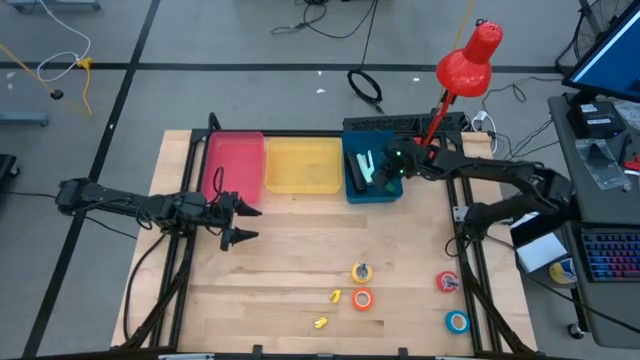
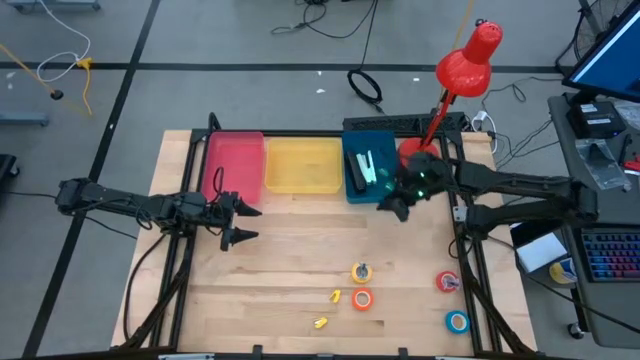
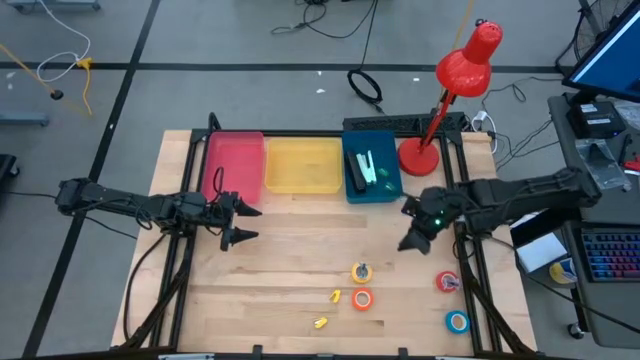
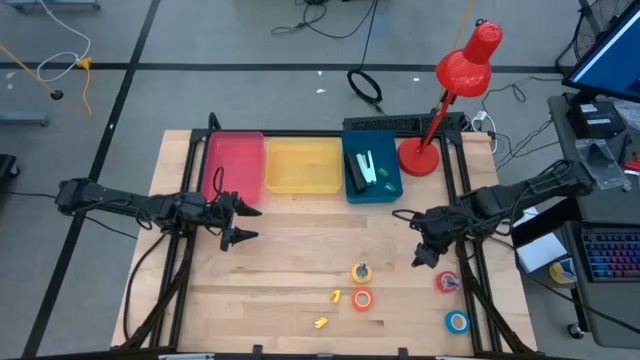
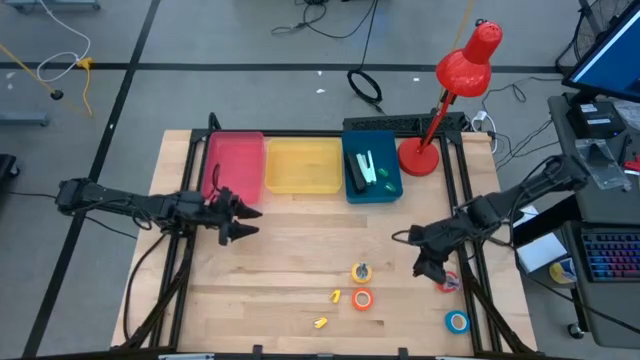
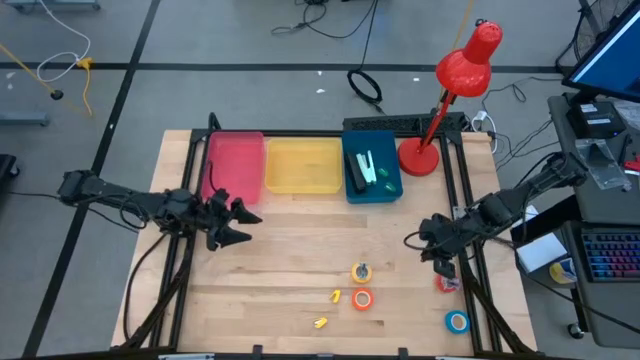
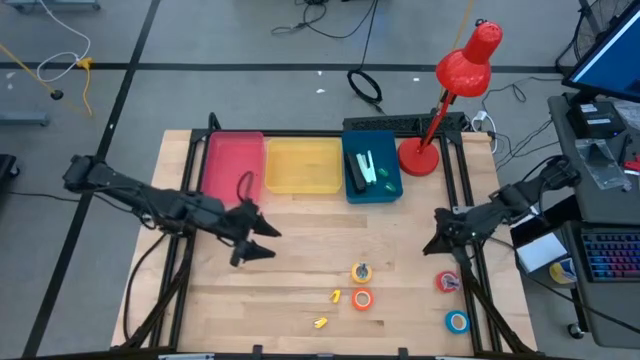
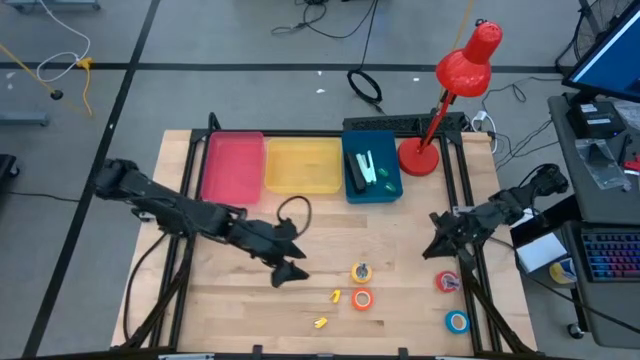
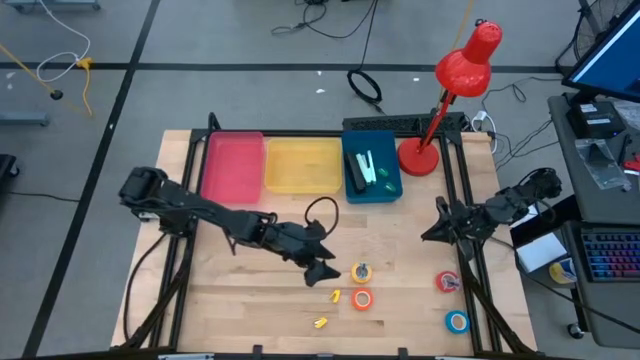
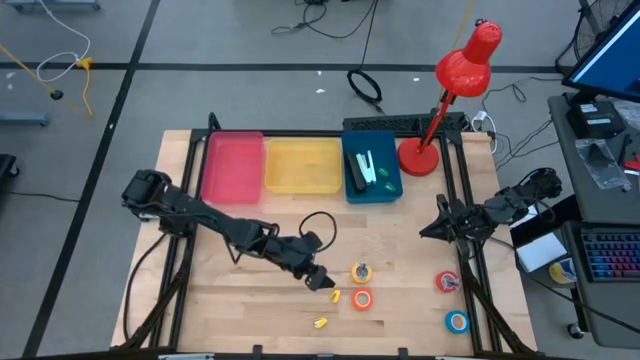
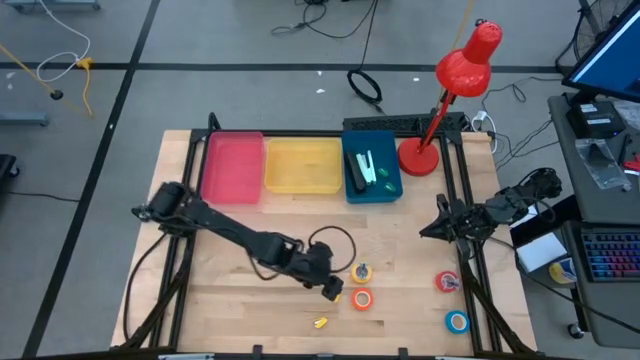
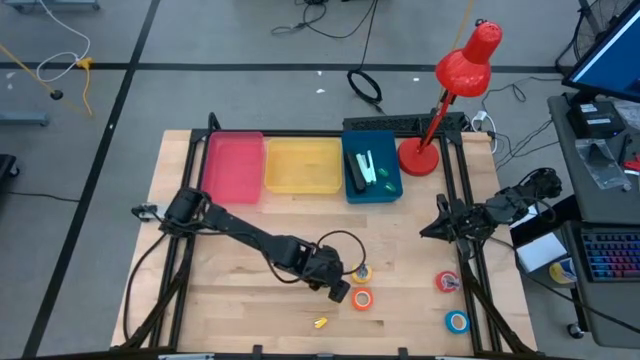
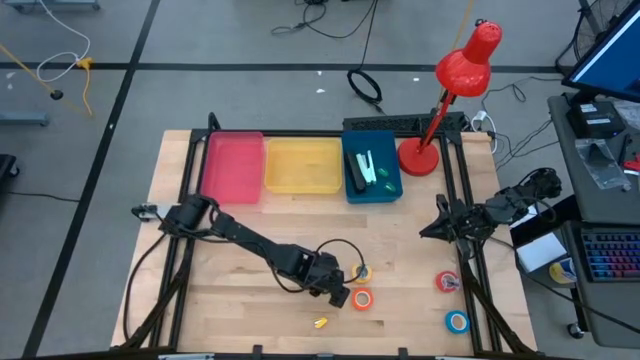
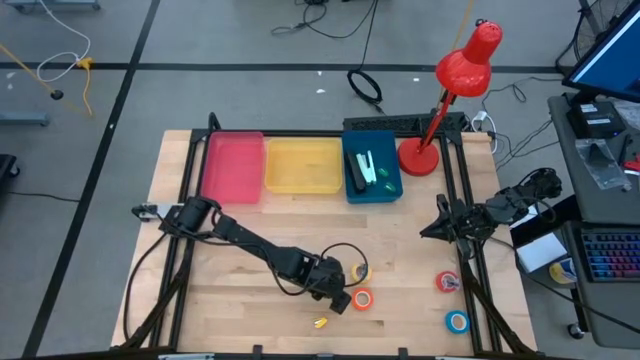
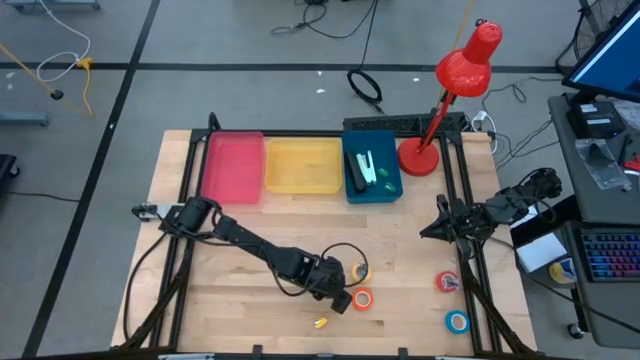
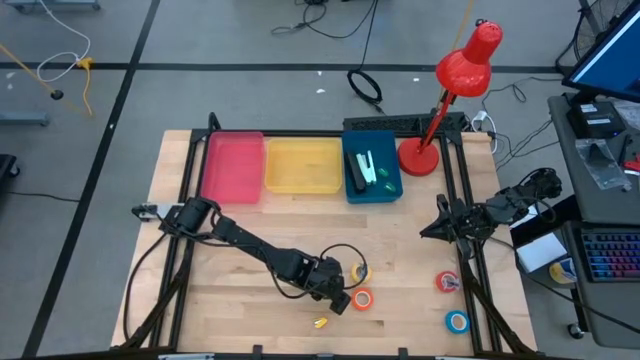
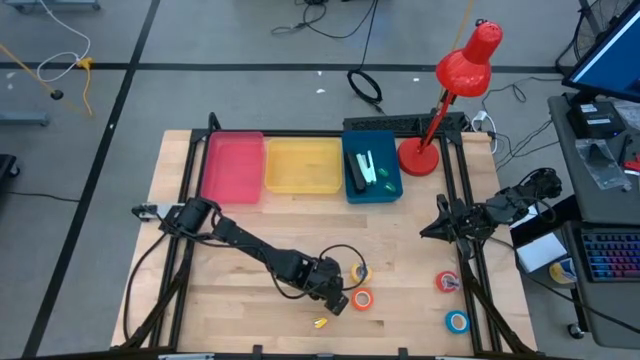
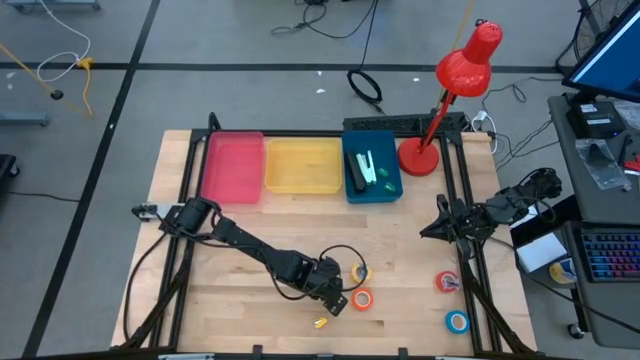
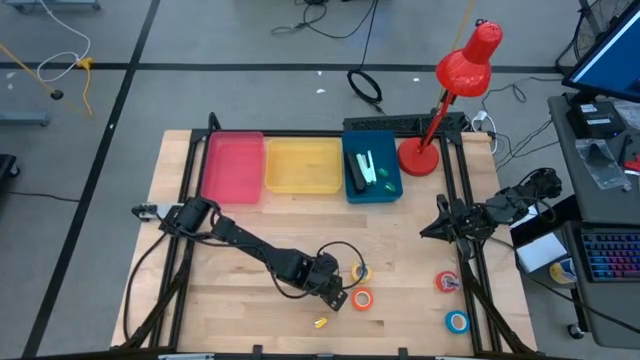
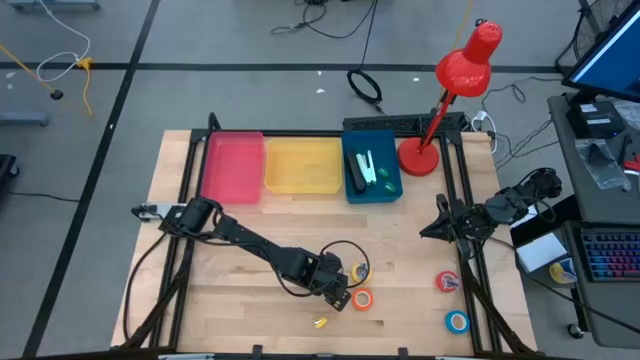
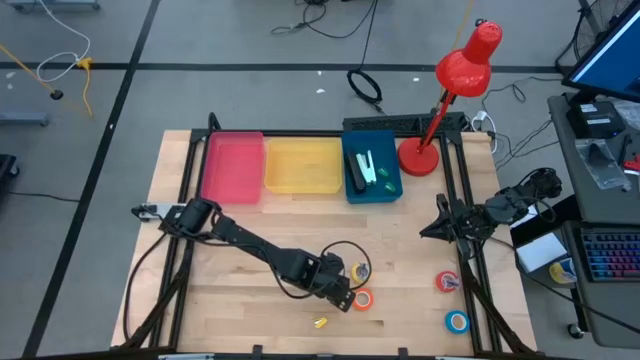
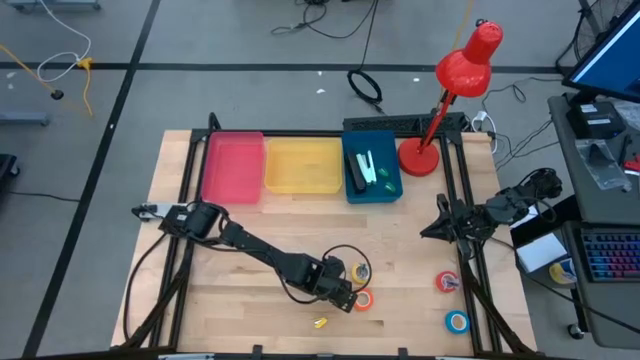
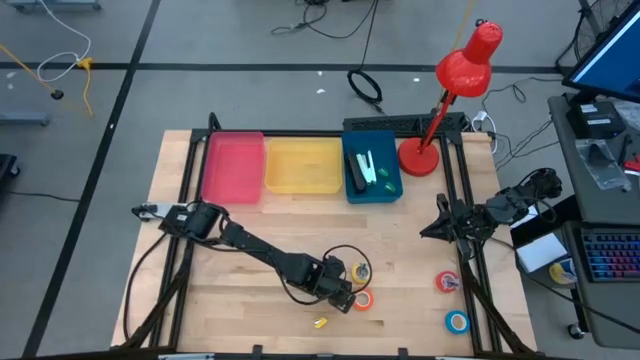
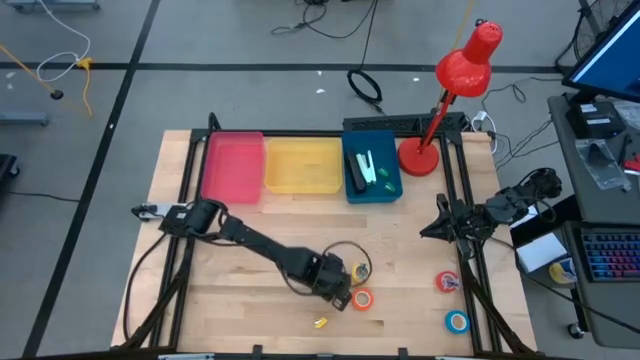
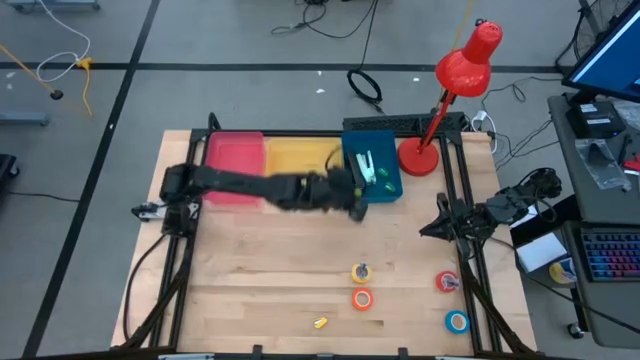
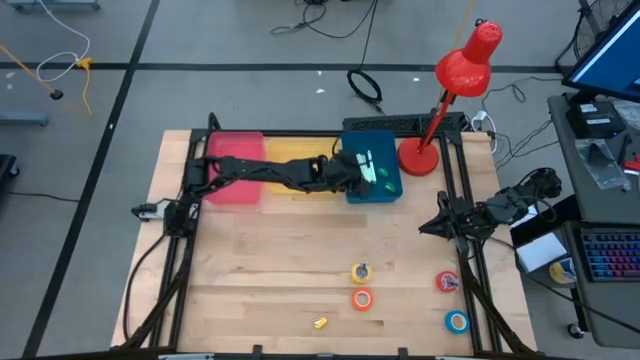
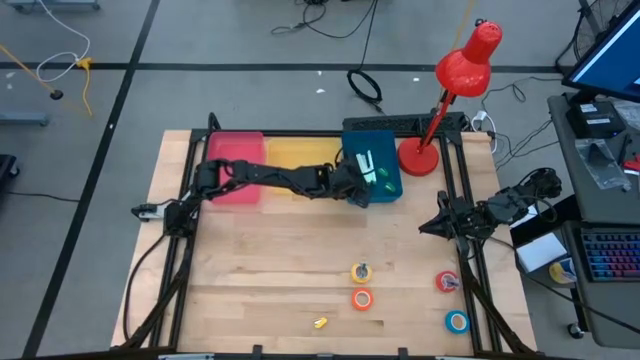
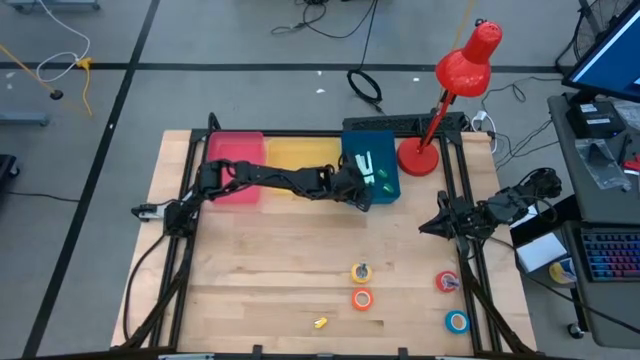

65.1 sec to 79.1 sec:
Task: Pick and place Stapler, Stapler remover, tape
Put the top yellow small stapler into the blue bin
